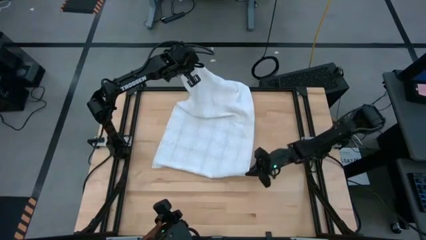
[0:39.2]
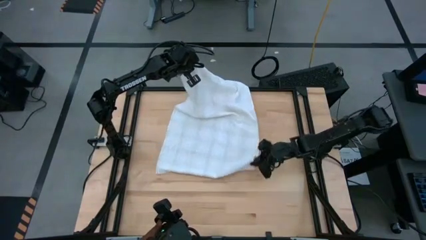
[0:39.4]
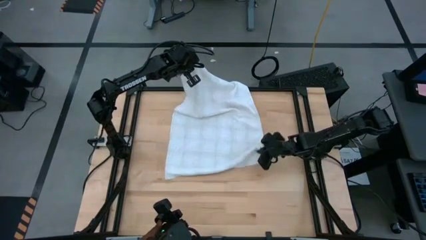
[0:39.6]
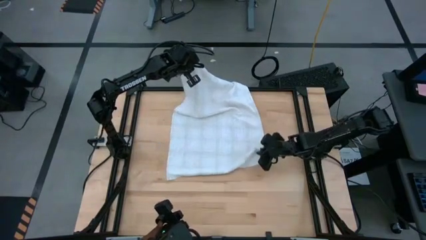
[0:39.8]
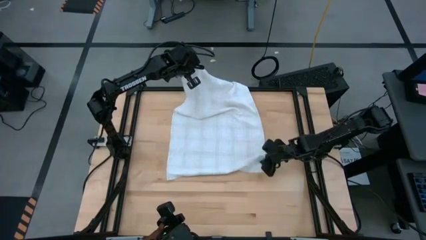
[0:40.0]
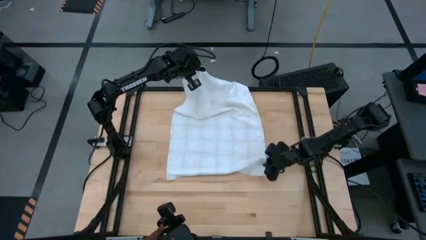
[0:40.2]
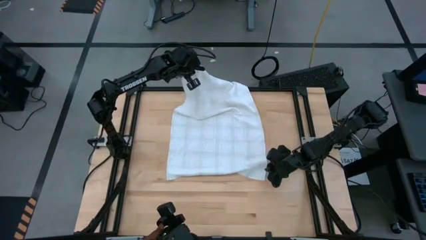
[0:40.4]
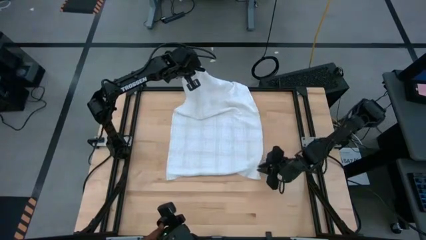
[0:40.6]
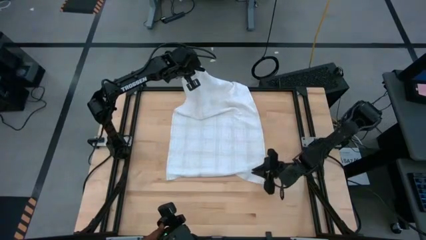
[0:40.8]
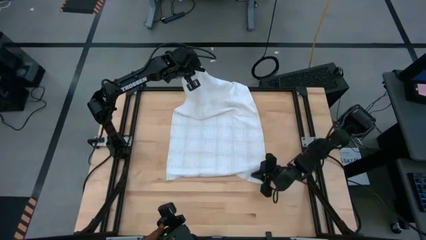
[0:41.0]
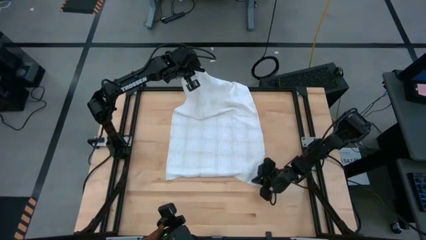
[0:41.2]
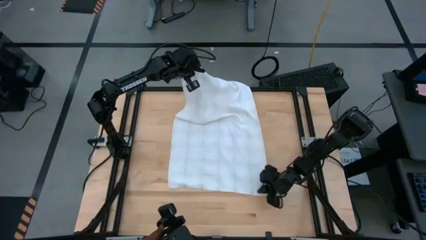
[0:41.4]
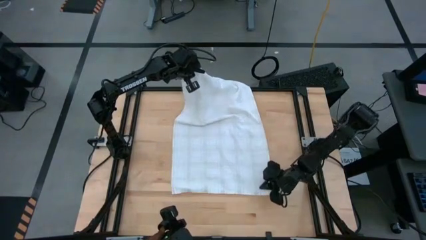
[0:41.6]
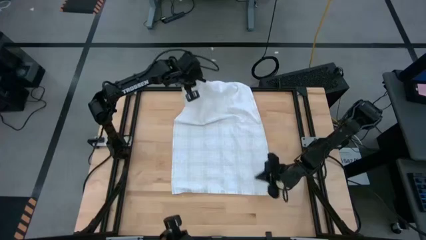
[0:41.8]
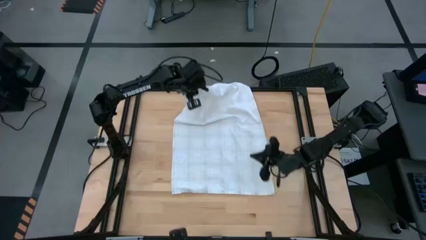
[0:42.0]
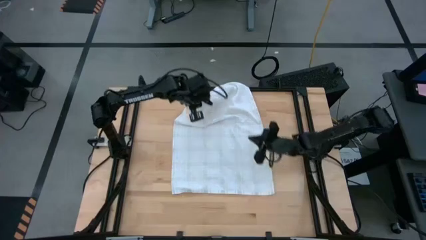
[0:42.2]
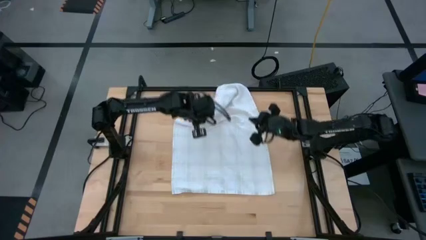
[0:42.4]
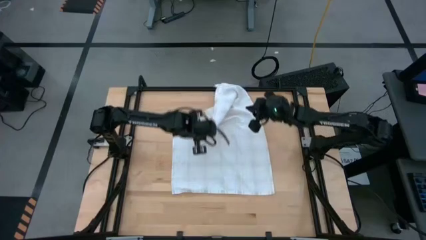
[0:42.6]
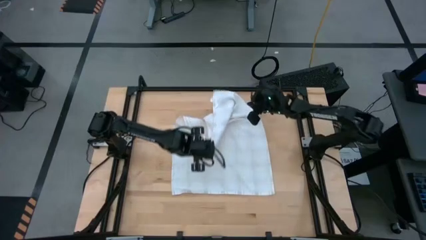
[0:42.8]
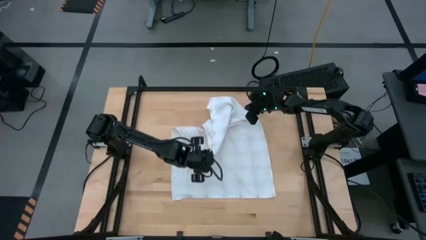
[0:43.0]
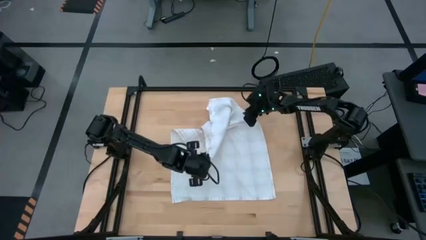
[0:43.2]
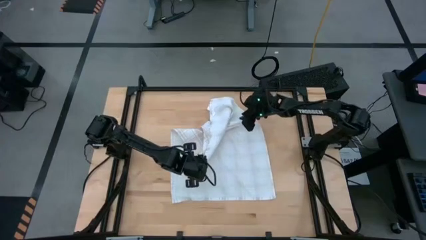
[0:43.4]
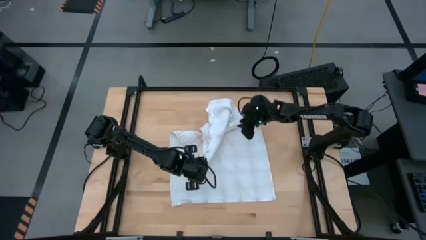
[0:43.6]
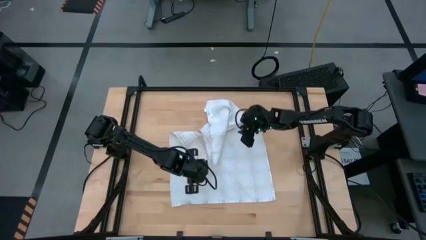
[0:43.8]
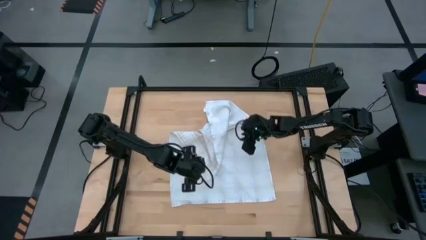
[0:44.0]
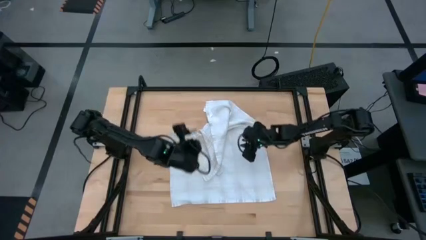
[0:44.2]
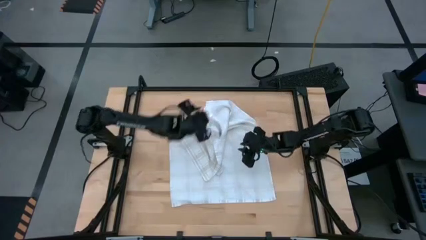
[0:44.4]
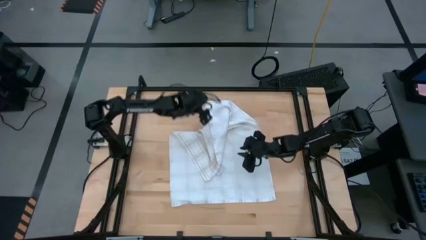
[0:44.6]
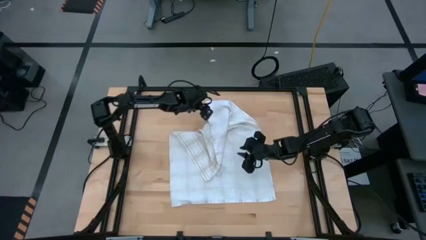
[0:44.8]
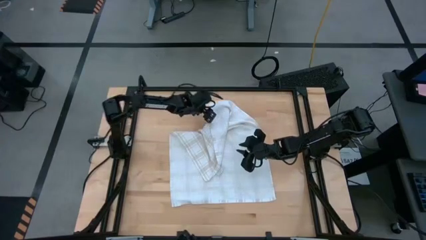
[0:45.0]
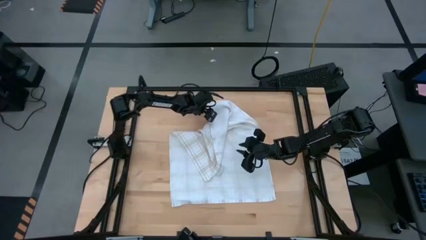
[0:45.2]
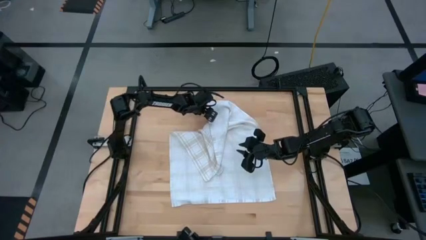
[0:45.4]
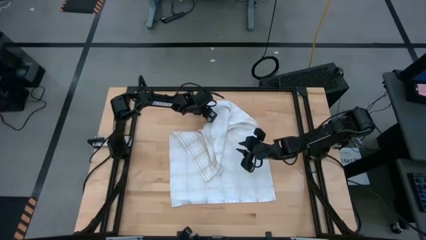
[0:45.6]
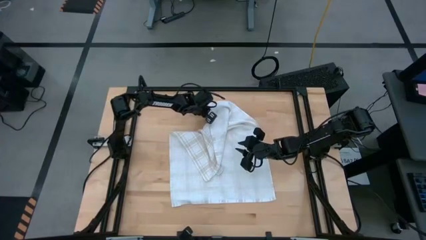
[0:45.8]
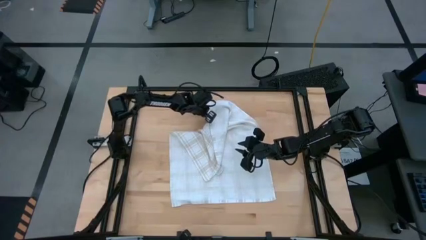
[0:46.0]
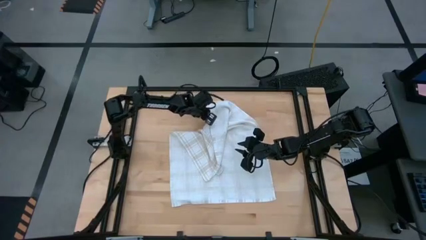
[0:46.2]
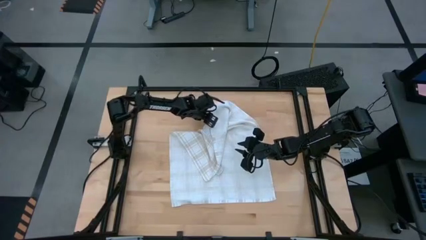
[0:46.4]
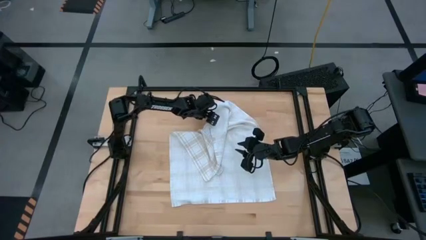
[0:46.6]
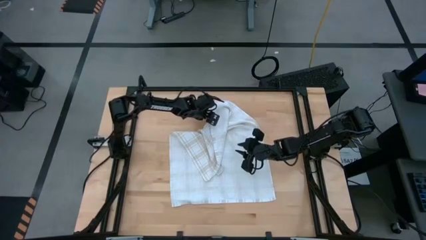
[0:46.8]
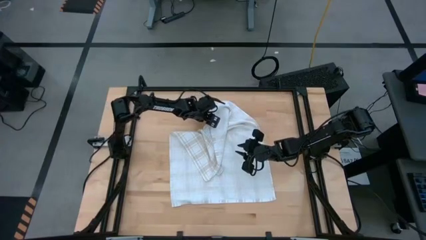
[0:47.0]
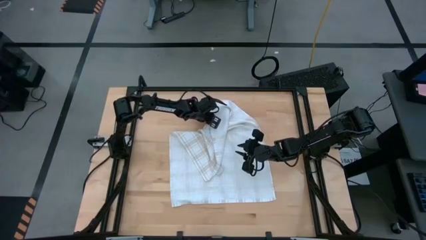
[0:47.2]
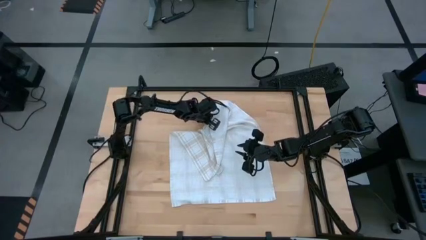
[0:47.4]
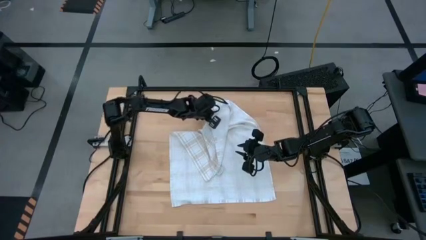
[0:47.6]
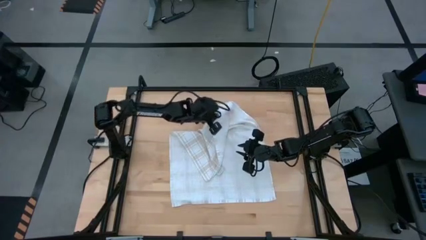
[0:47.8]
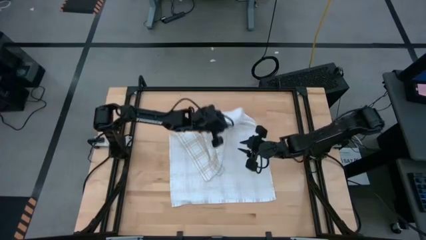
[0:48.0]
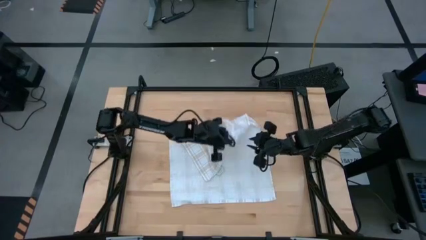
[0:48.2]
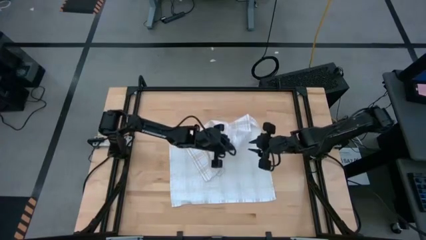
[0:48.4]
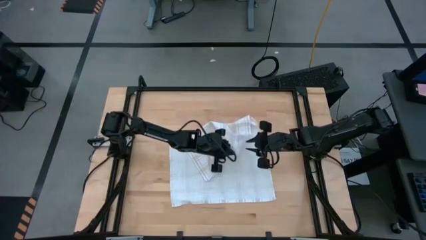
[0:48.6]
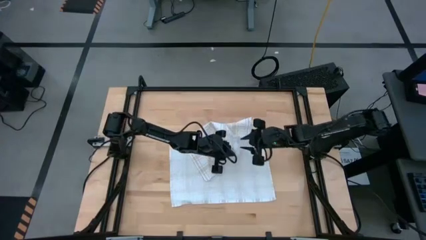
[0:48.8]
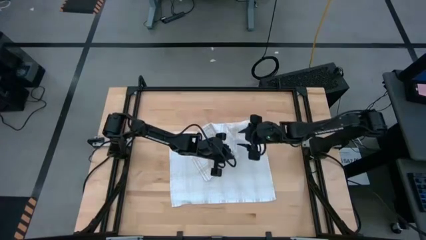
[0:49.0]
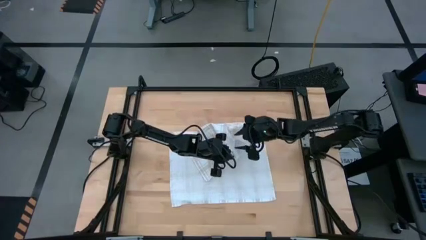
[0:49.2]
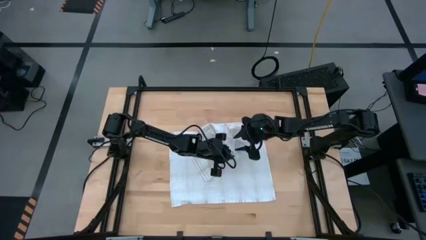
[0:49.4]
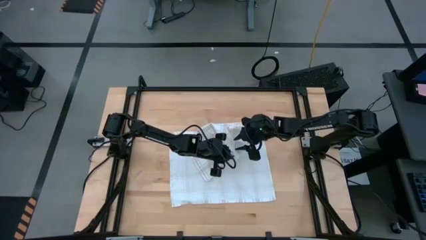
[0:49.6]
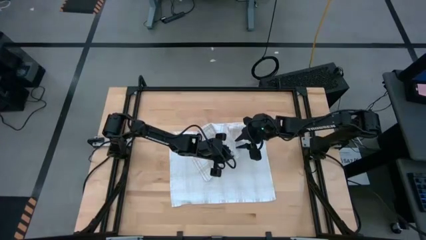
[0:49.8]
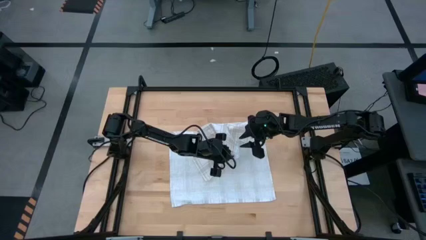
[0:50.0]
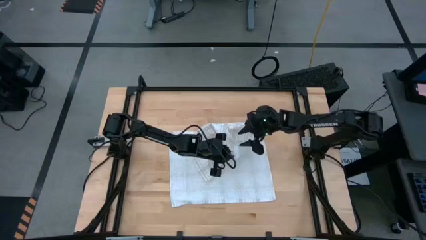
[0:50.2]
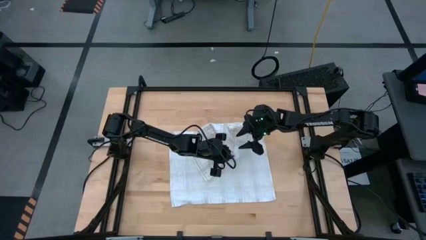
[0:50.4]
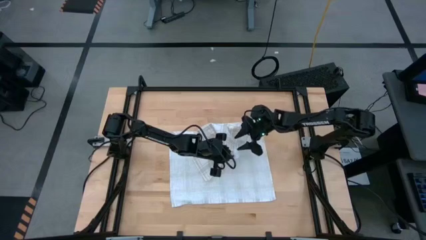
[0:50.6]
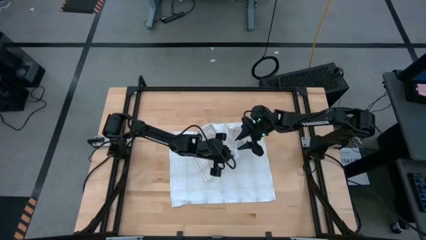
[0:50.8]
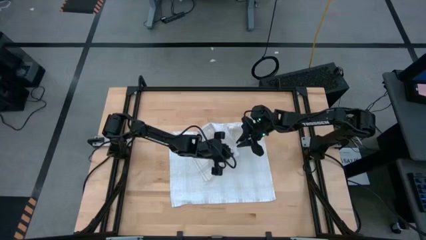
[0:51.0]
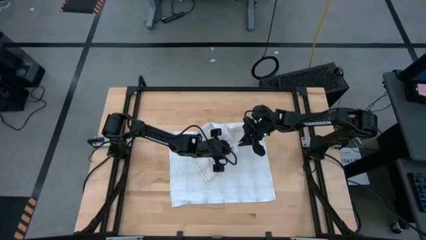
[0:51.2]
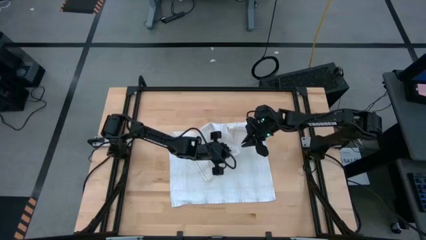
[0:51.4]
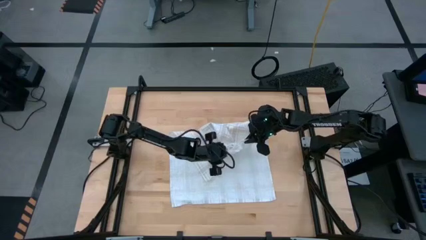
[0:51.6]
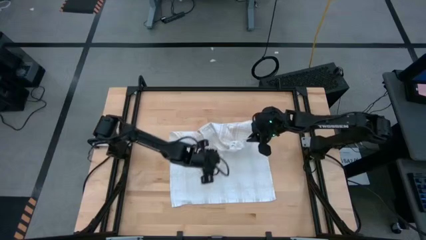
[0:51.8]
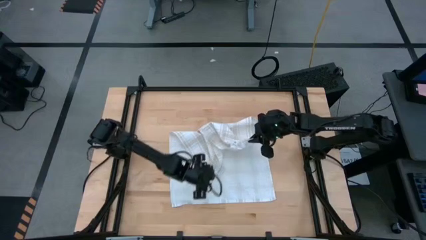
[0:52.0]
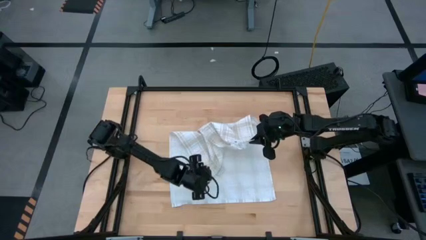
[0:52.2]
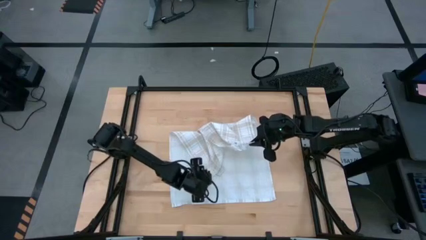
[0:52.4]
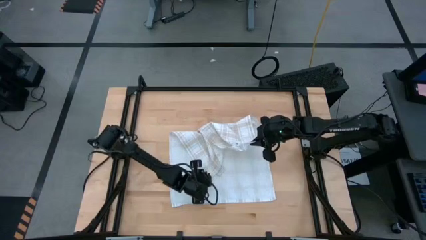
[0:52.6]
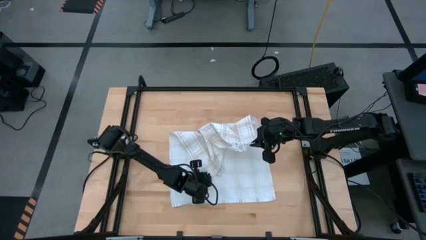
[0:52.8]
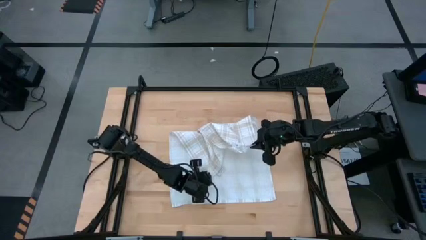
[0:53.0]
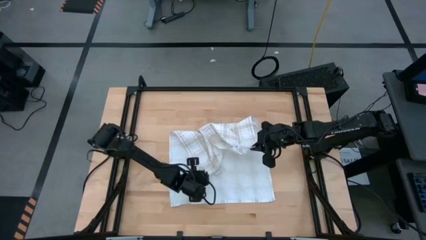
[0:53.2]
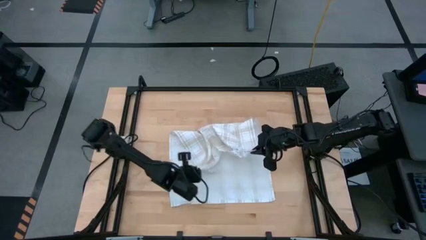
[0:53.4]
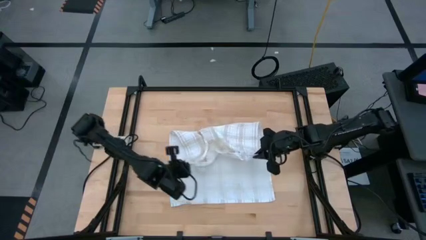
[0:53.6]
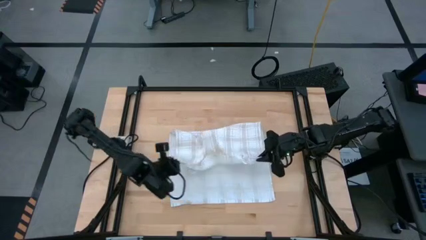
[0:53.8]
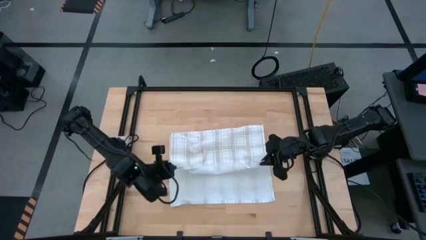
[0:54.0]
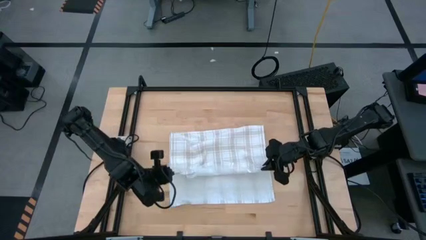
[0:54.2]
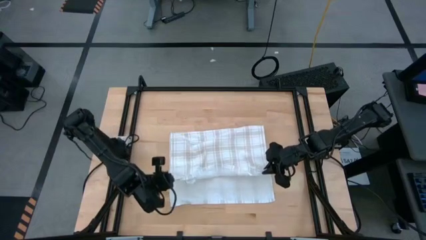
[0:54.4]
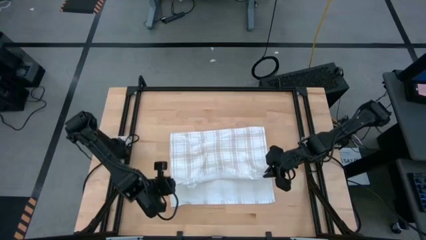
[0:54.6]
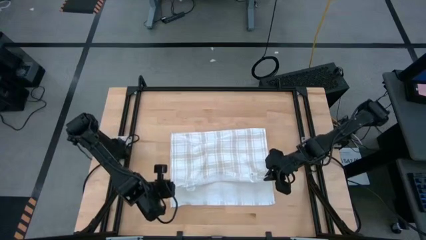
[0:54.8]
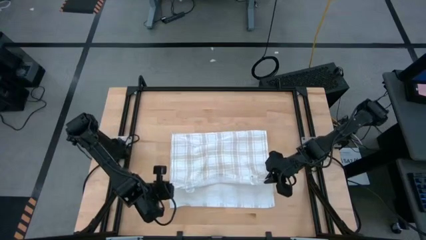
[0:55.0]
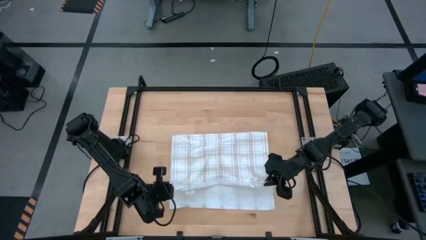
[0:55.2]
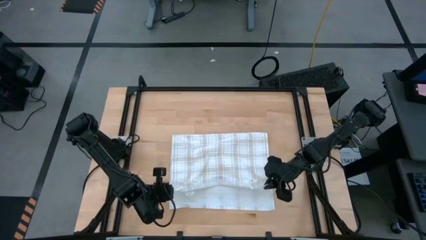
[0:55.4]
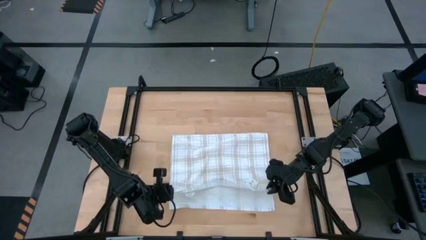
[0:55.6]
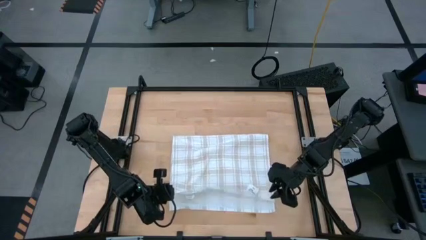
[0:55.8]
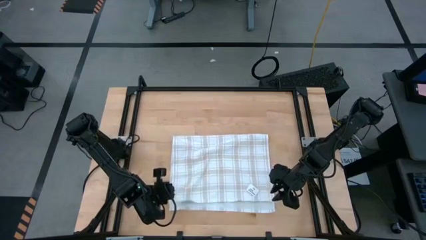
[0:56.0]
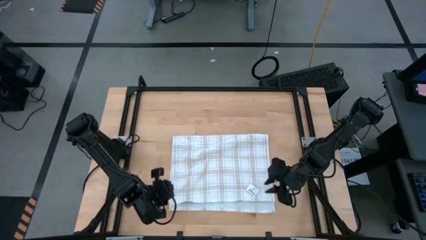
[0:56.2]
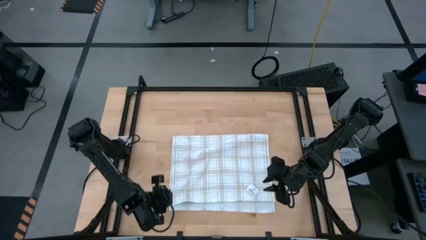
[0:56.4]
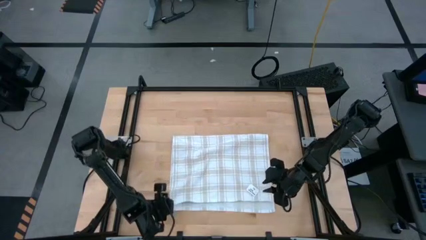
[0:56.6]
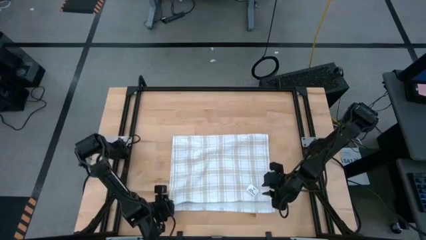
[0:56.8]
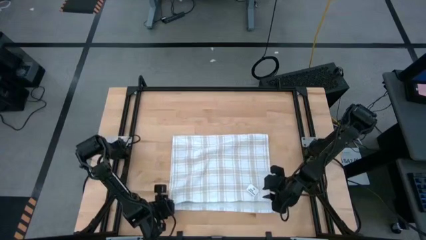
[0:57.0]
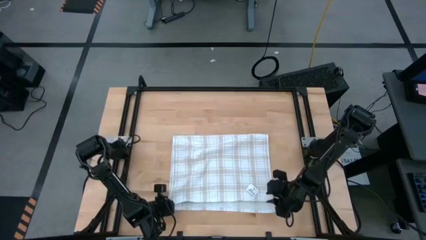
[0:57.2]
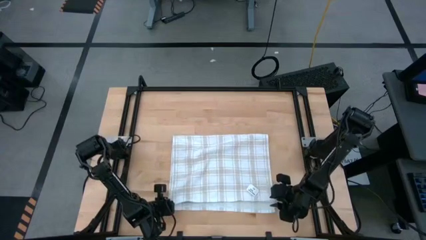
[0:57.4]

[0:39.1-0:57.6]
Task: Roll towel
Roll the white towel
